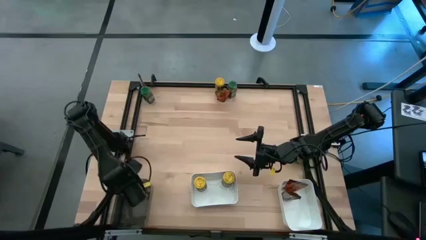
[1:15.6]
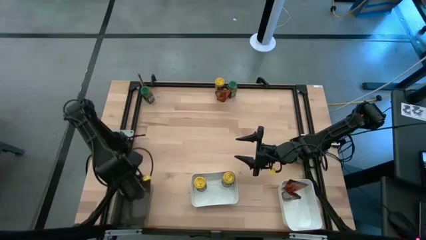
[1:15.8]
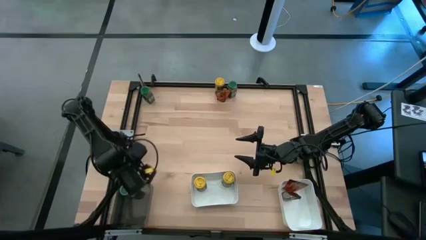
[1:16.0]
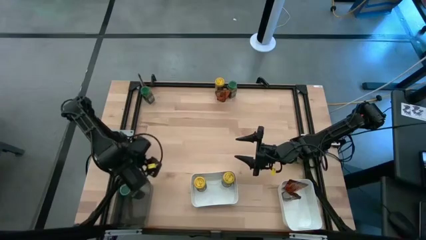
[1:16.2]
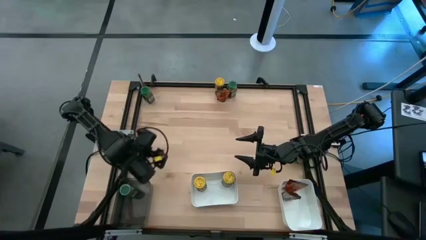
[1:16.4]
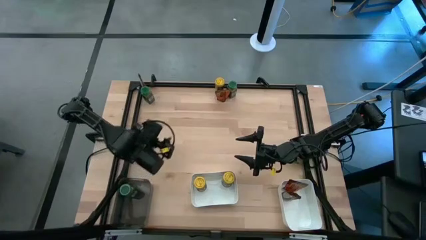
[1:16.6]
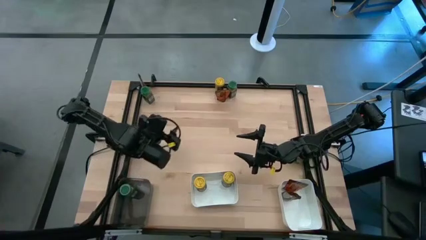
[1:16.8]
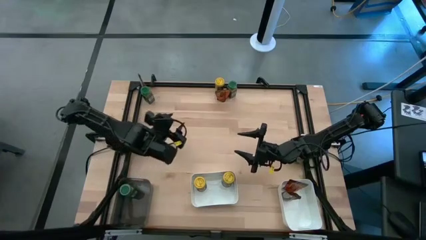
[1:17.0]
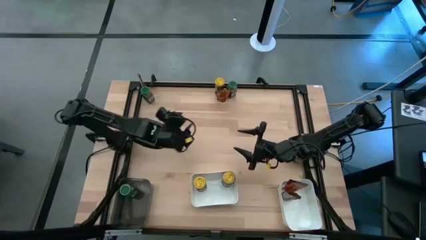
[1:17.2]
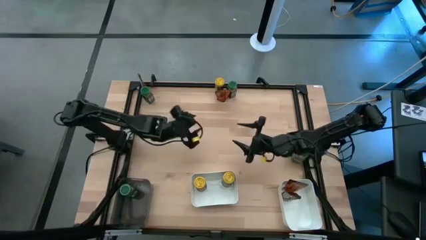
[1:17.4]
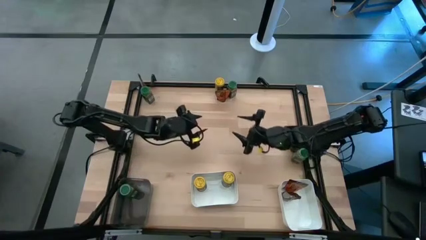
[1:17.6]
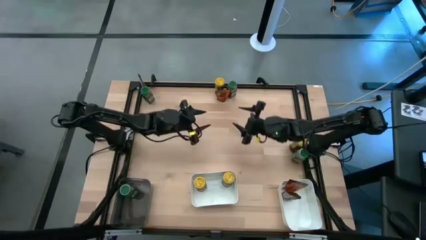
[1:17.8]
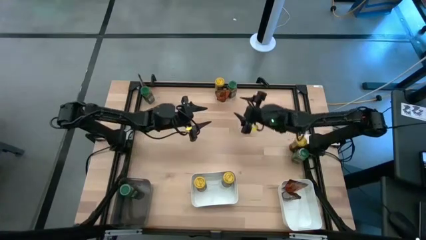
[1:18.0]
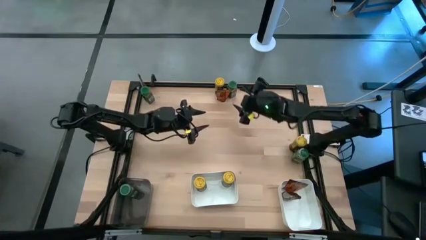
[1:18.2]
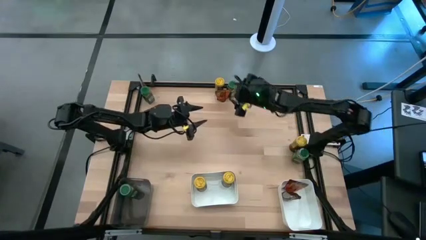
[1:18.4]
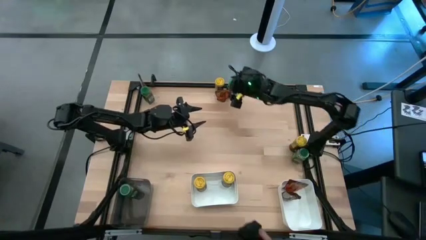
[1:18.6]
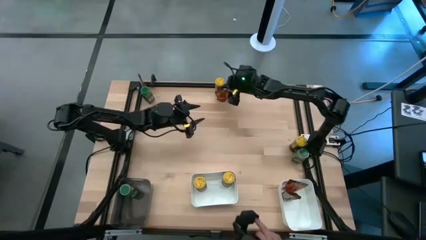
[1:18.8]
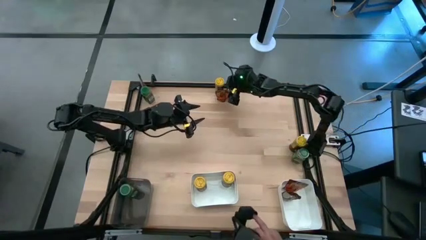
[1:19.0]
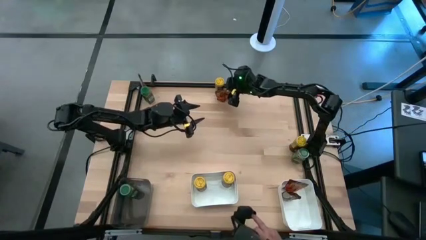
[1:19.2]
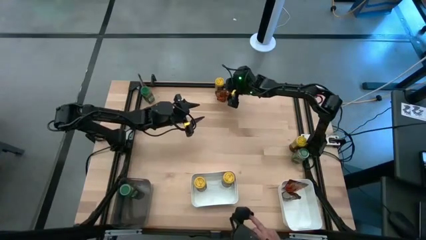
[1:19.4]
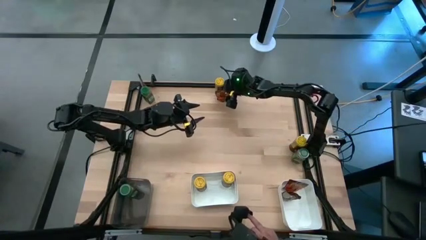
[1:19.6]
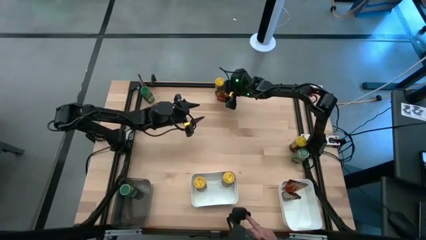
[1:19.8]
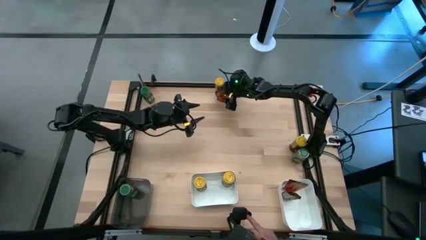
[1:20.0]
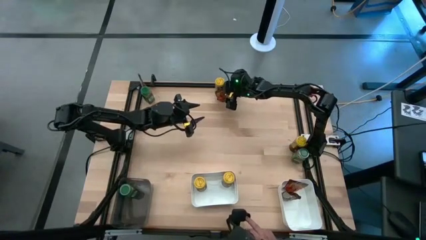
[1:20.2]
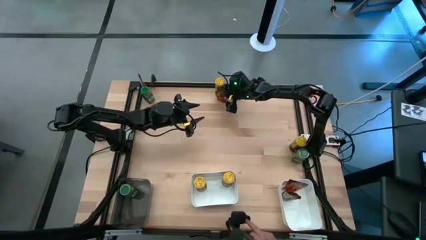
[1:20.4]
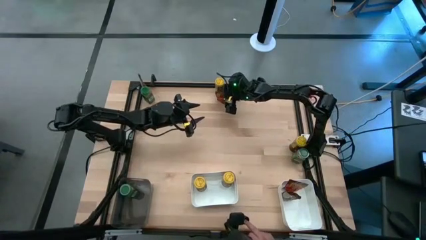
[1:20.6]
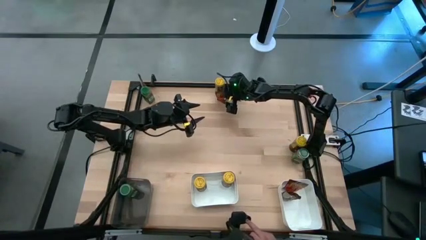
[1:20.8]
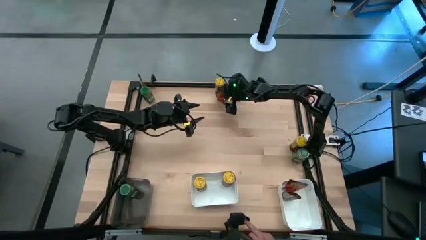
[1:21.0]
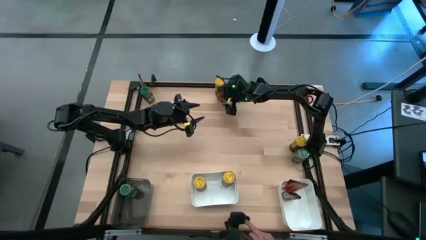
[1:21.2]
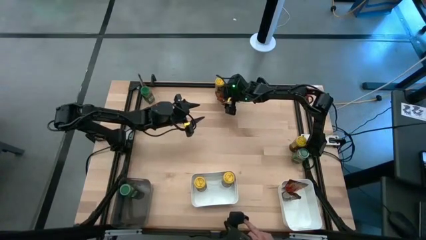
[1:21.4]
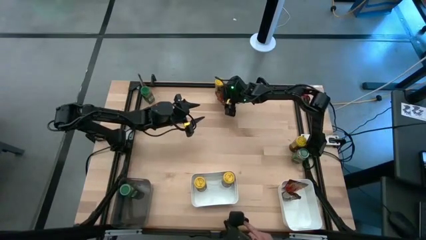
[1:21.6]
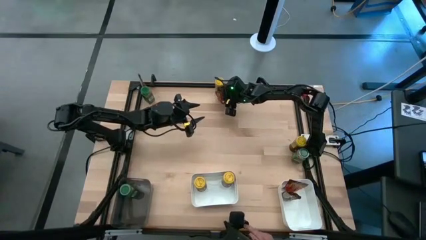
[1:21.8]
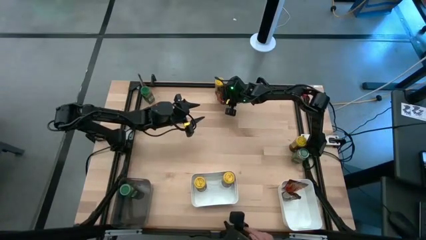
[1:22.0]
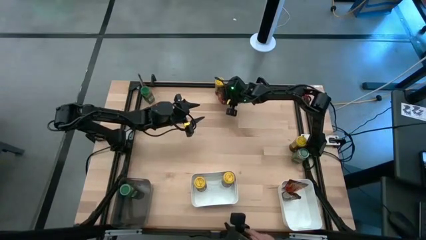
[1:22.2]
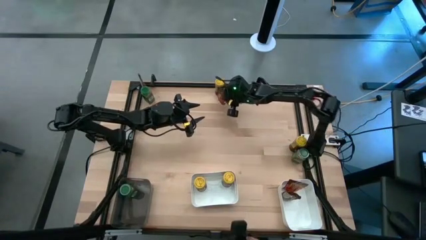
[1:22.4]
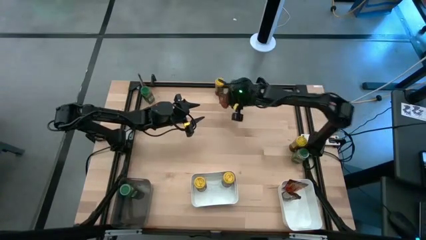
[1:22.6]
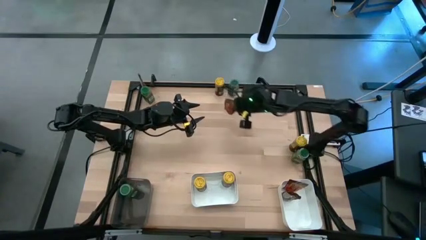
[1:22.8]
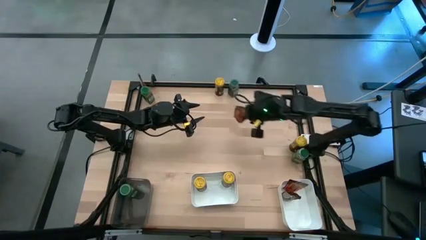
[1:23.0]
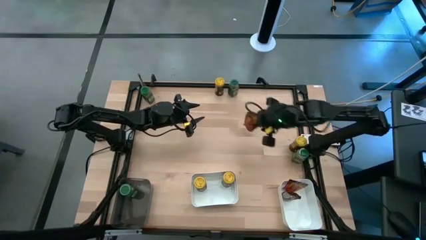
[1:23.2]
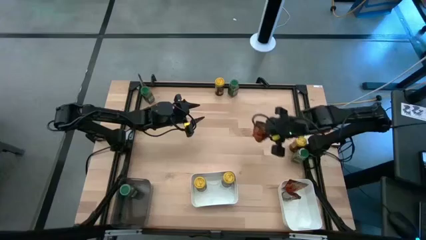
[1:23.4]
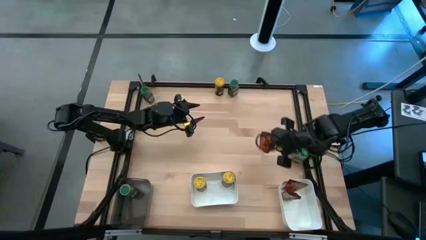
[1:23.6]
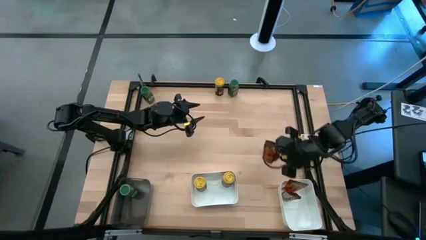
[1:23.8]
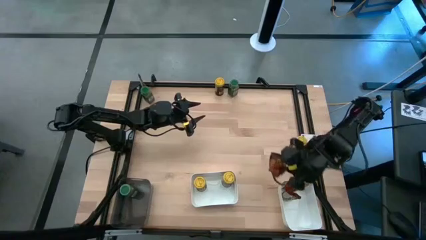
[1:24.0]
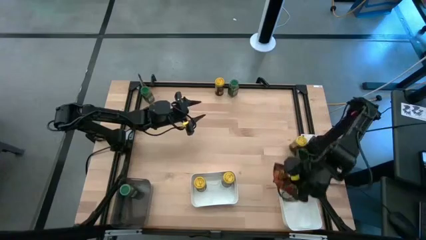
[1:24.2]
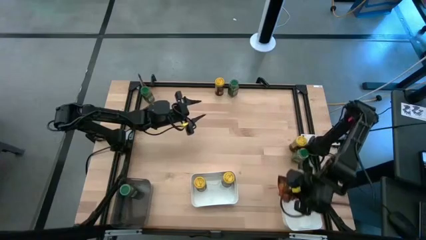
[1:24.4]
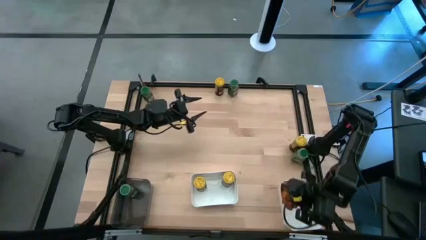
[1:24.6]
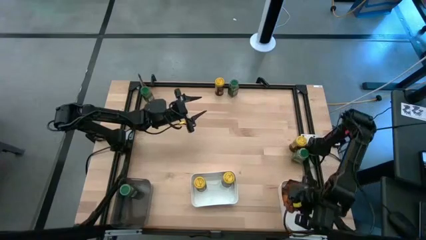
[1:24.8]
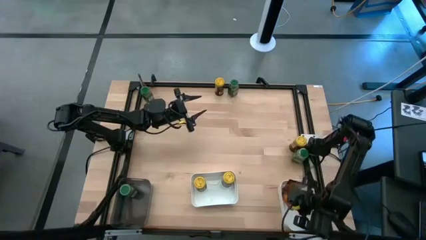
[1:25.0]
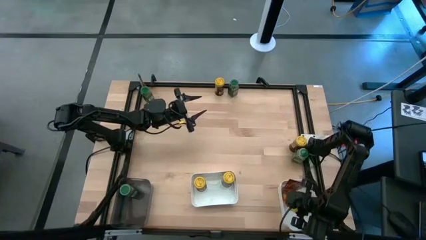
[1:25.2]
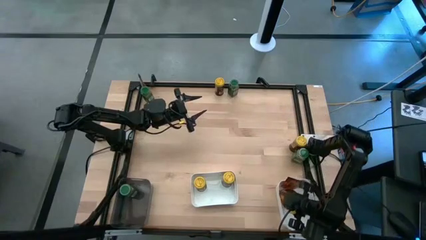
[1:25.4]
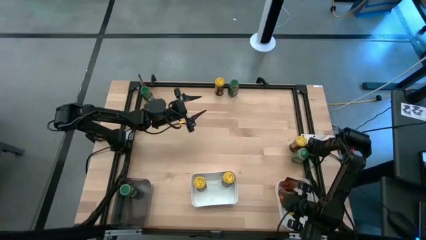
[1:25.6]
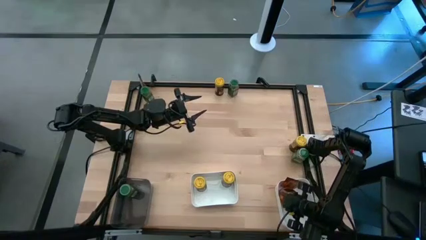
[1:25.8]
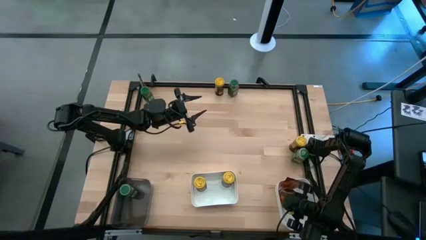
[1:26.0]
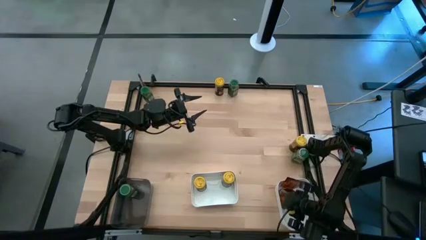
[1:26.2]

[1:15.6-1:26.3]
Task: Sort spices by type
Put the right brown seasoning bag into the right white bin

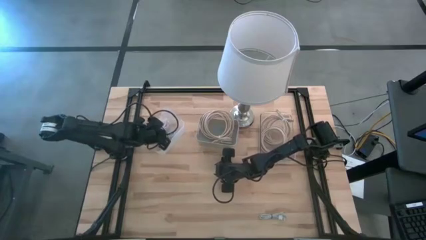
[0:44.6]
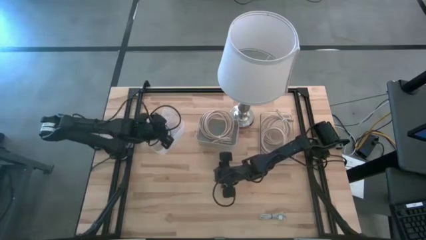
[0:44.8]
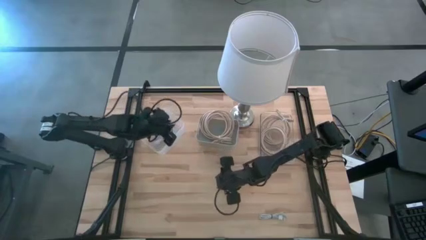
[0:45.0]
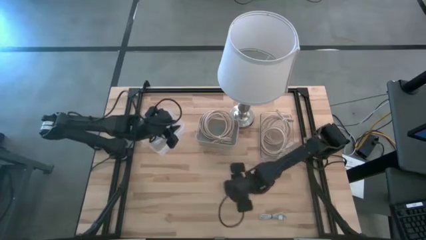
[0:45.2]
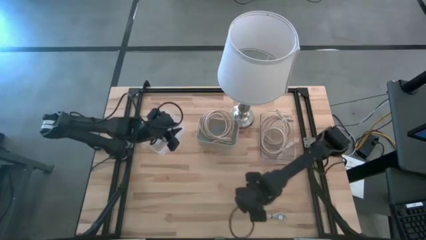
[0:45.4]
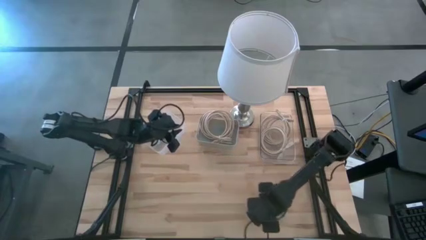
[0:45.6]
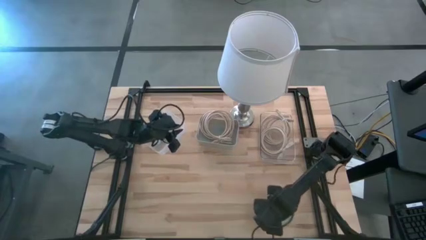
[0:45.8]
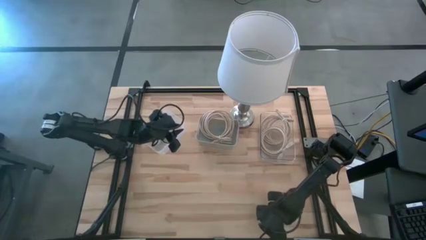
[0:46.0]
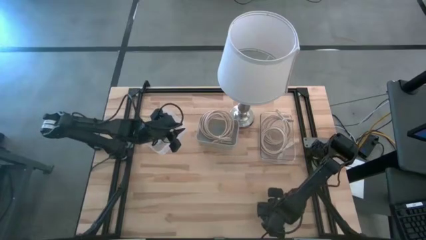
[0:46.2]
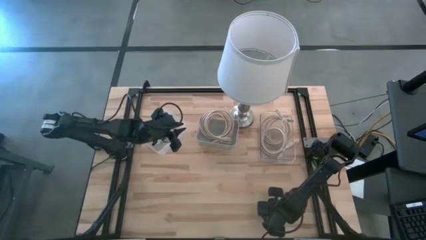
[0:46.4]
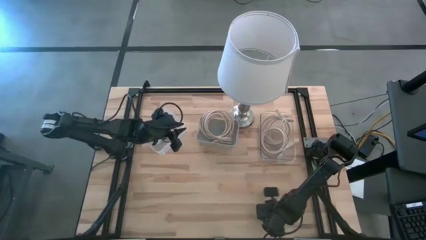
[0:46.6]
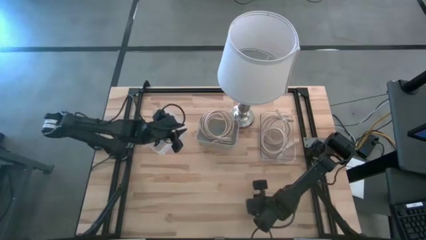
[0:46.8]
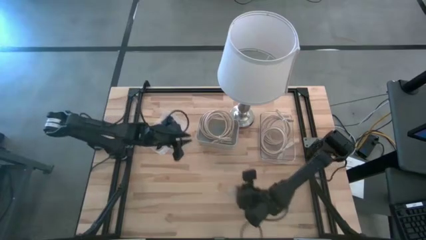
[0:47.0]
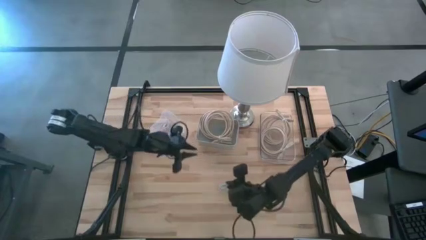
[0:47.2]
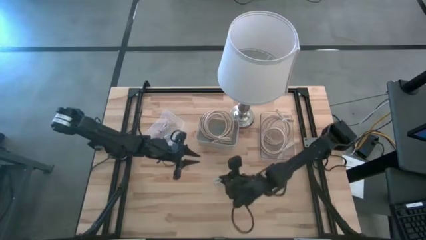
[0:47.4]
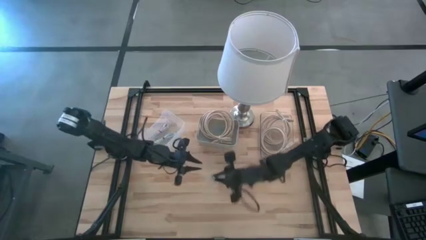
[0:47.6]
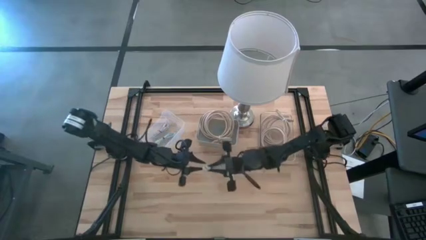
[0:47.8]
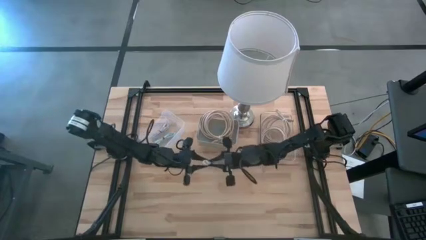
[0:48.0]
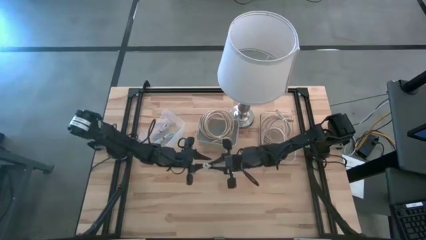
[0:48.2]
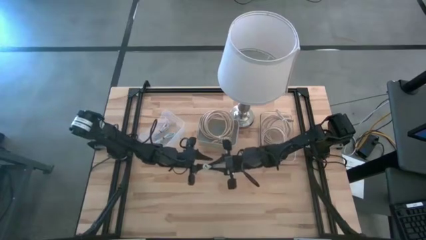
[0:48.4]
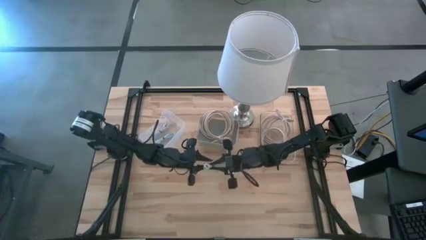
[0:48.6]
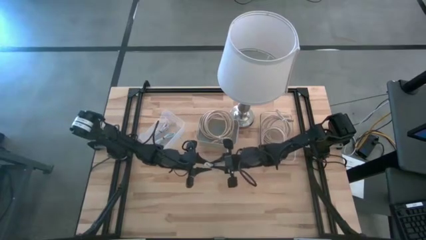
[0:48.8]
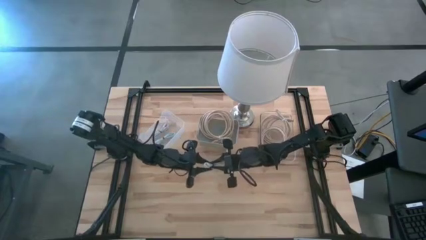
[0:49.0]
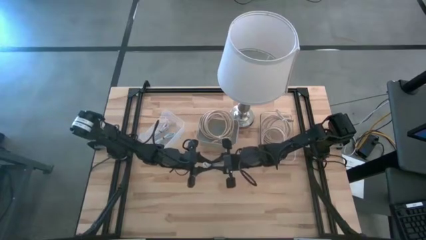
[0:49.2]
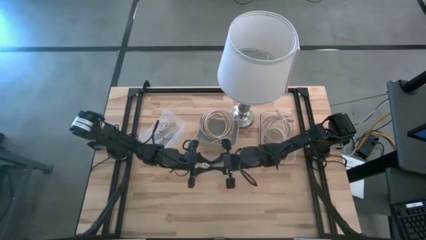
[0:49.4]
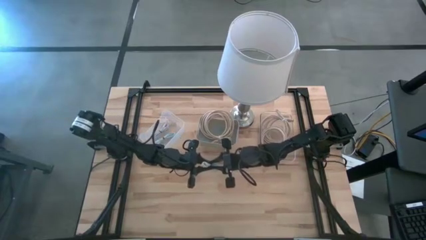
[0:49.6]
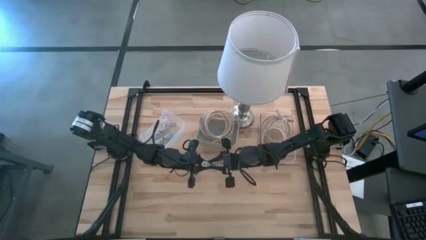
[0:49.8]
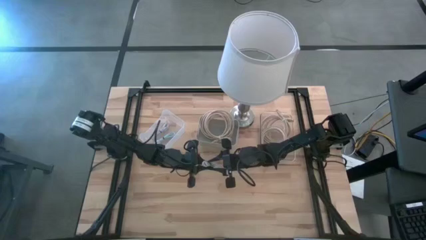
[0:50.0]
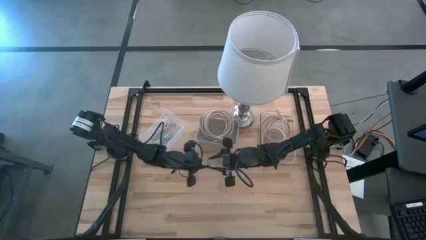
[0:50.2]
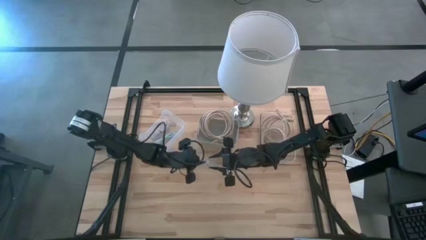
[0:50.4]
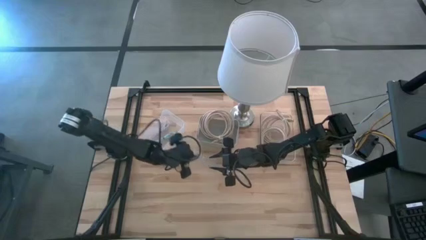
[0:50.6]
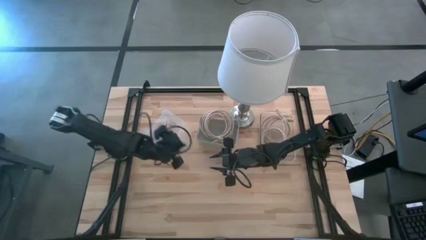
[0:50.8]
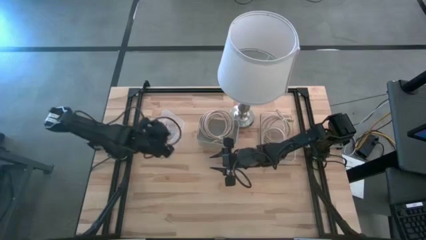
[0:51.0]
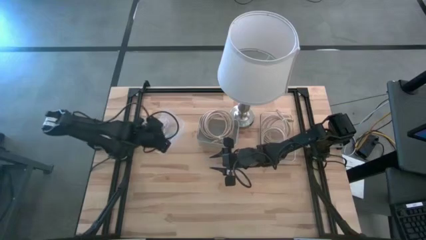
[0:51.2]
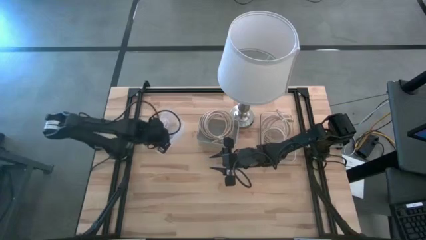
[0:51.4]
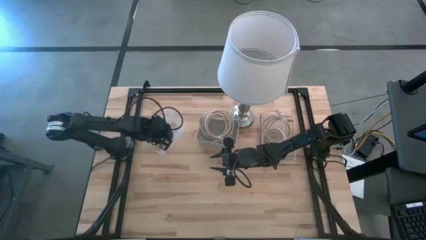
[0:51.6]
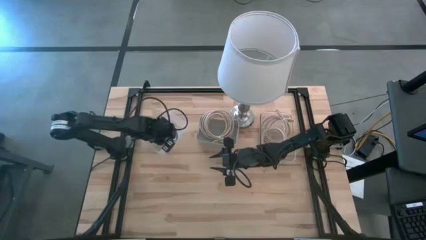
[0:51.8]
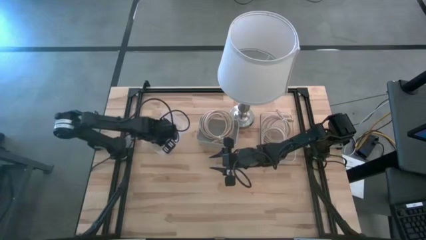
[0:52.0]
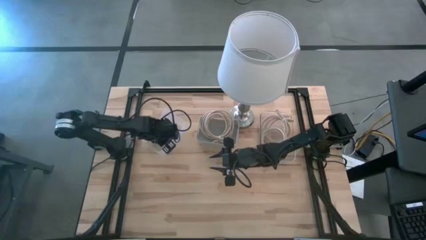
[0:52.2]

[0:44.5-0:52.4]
Task: Pick & Place USB Port
Put the white USB charger cable into the white bin
